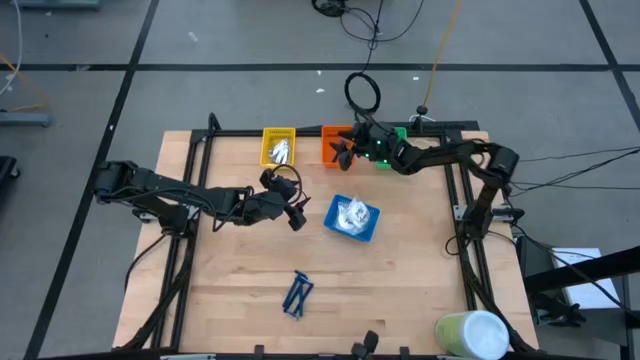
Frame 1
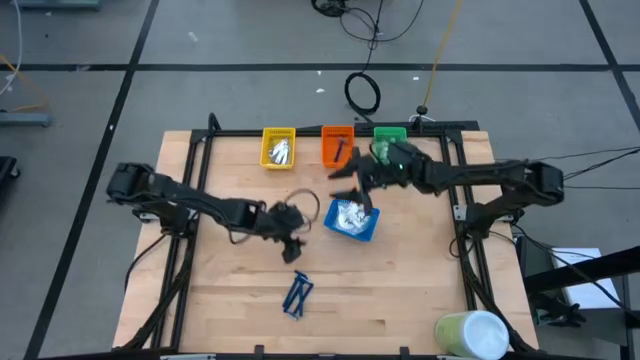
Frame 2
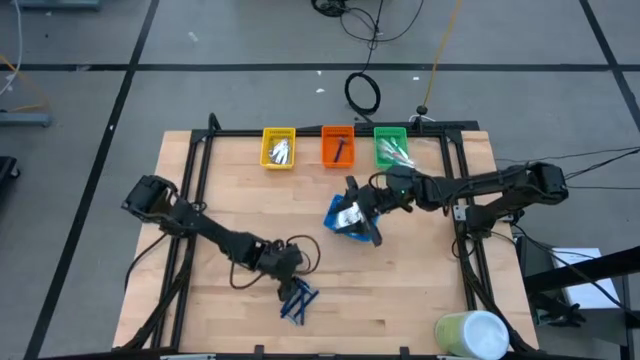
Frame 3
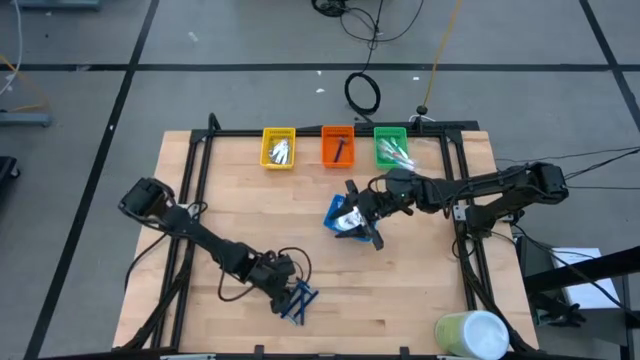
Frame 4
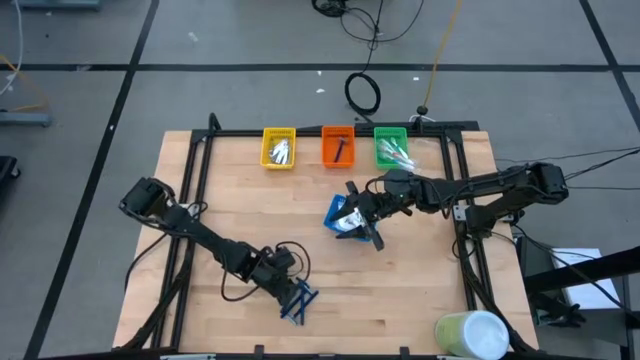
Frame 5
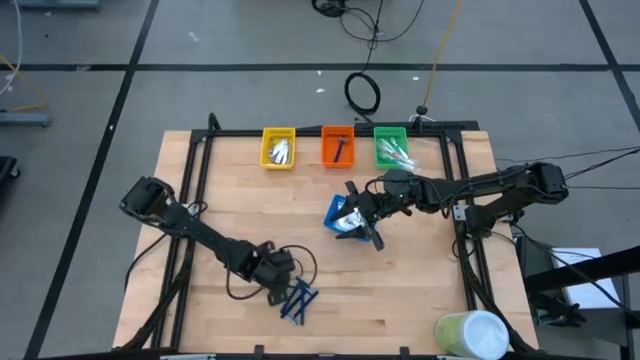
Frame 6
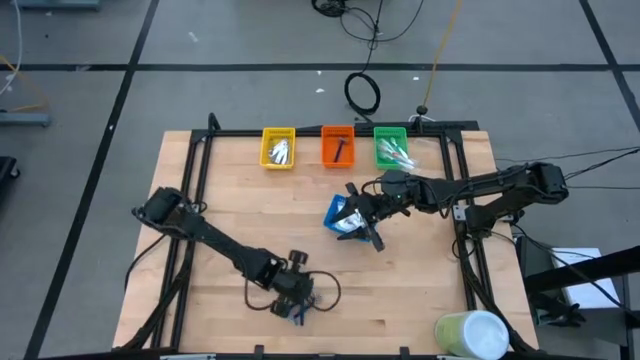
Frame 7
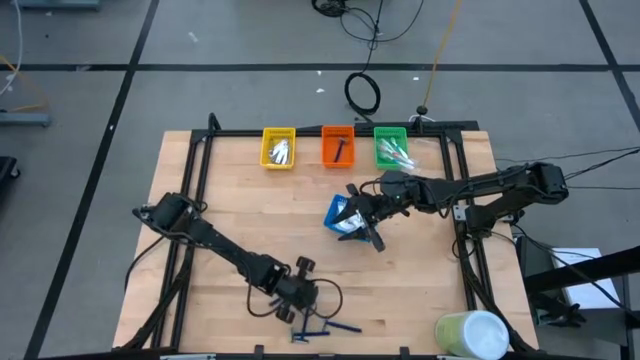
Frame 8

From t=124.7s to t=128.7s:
Task: Pick & Place Travel size toiletries
Put the blue razor into the orange basket

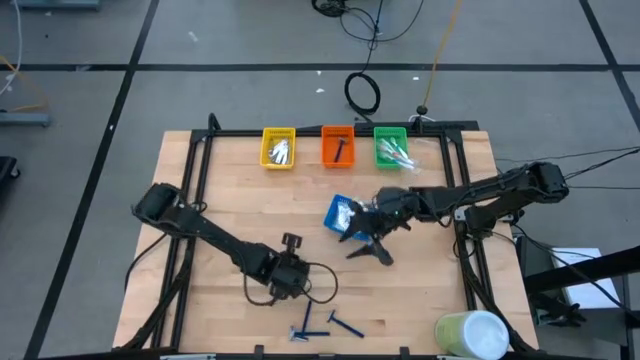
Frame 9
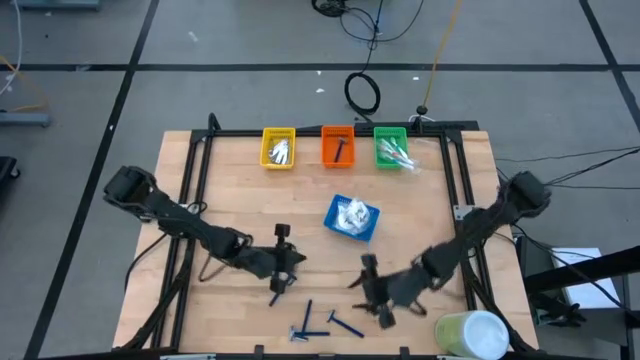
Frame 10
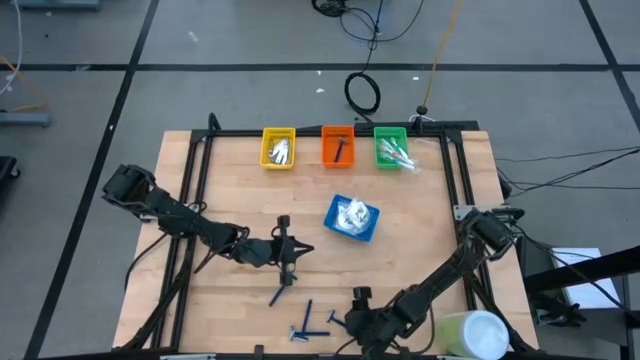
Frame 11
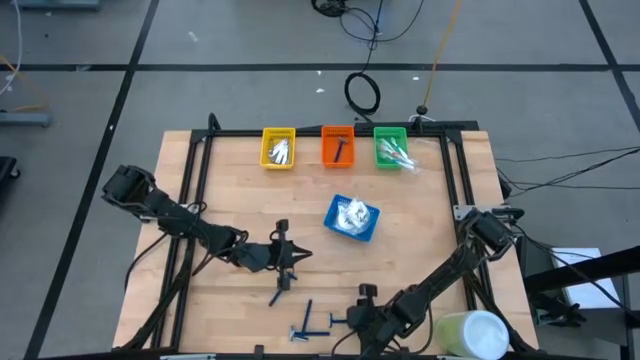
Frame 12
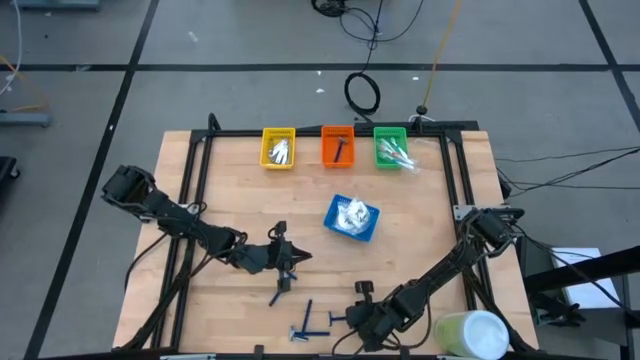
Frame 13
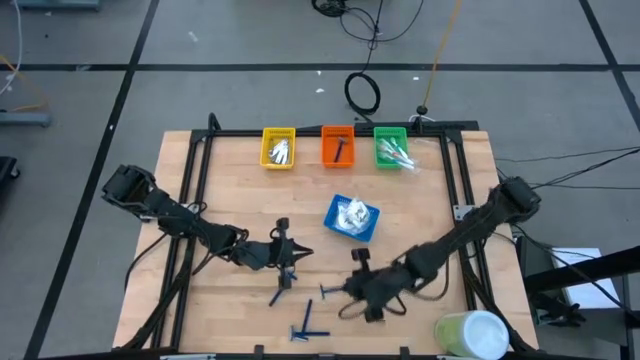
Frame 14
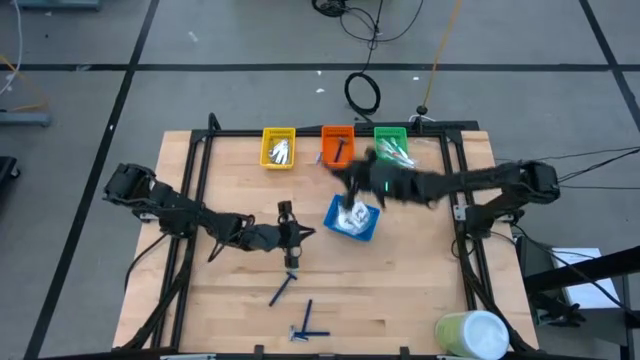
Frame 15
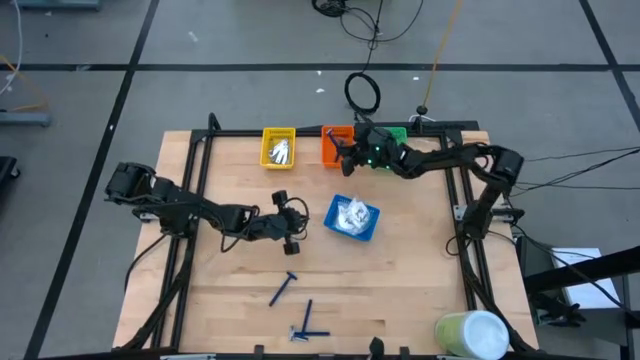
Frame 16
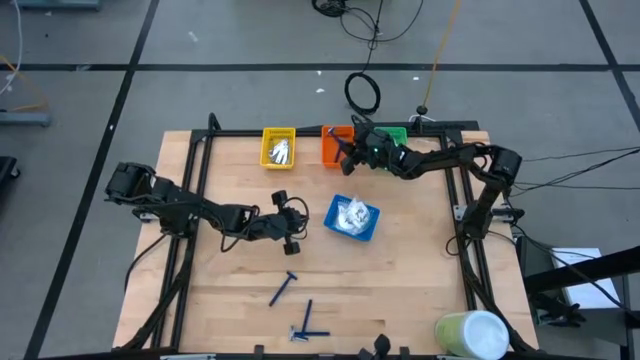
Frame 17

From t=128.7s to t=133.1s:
Put the blue razor into the orange basket

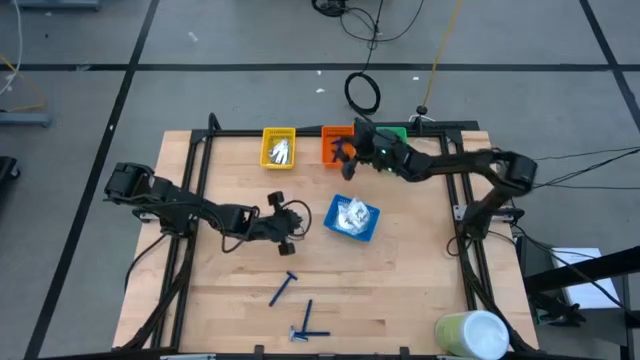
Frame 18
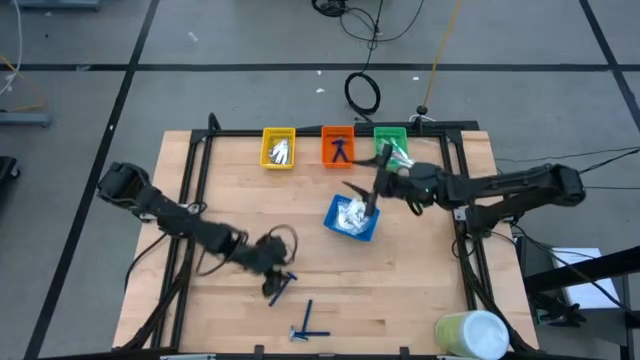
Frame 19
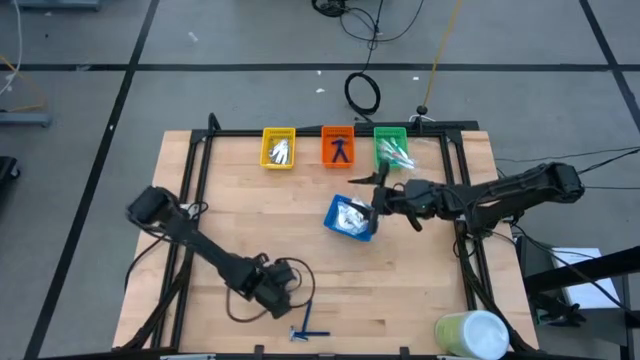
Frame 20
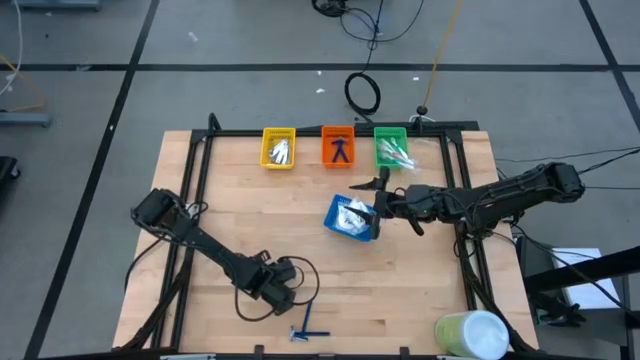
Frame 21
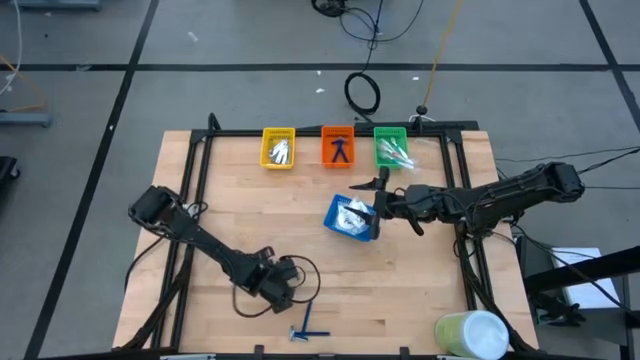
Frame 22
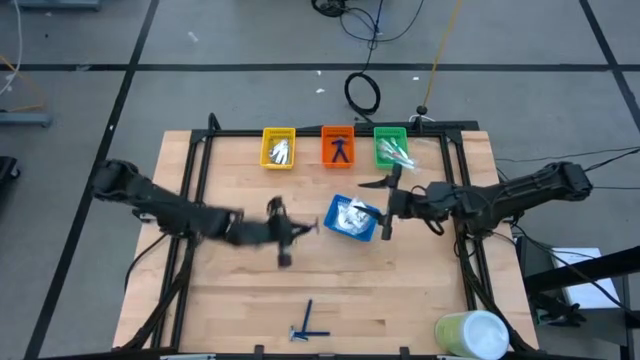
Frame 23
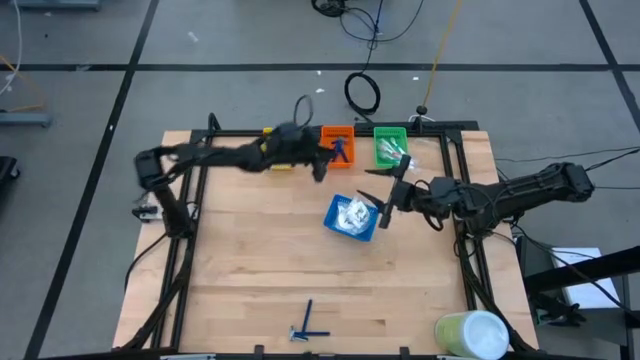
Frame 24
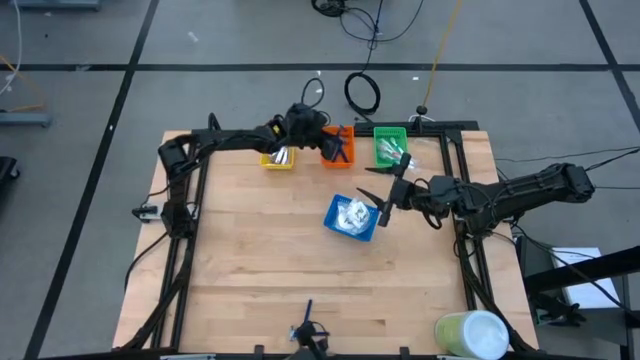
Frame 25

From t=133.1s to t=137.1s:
Put the blue razor into the orange basket

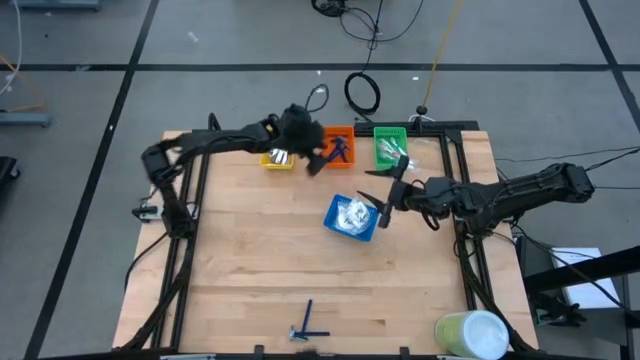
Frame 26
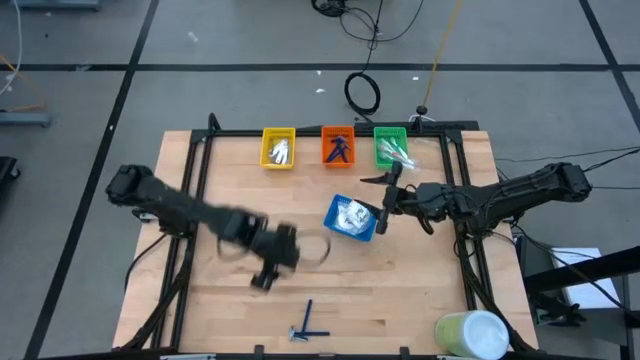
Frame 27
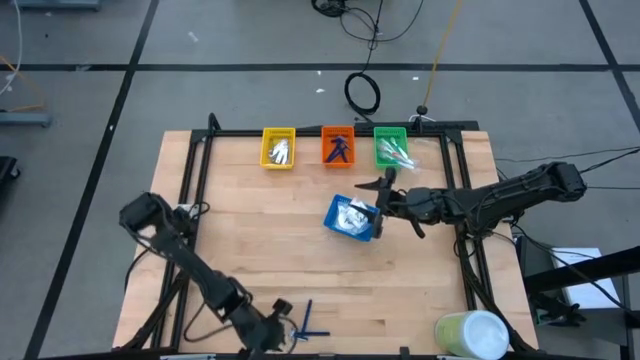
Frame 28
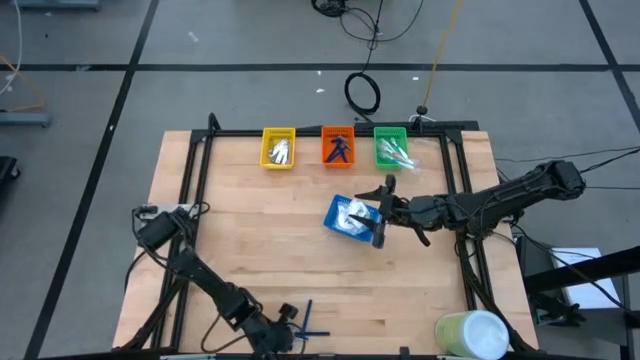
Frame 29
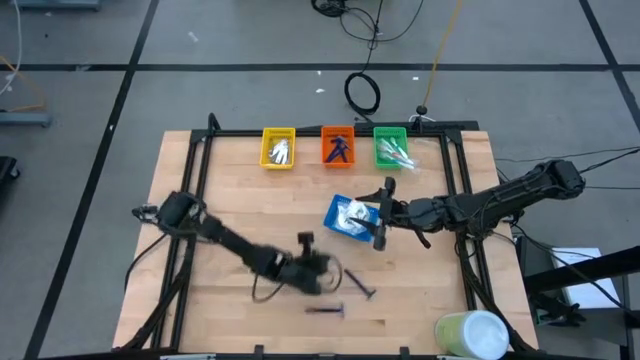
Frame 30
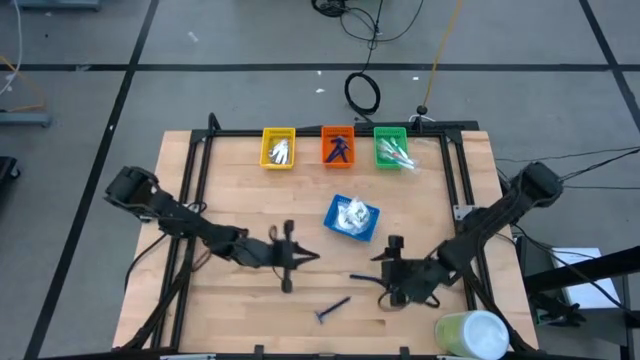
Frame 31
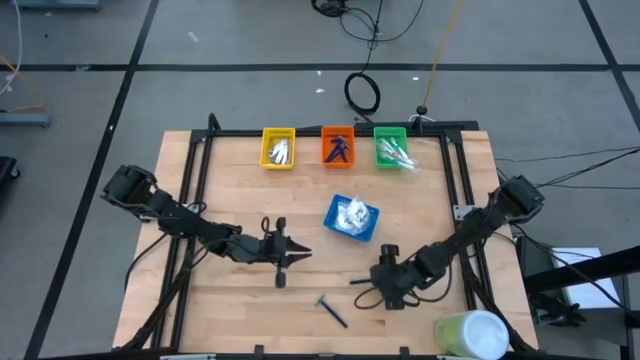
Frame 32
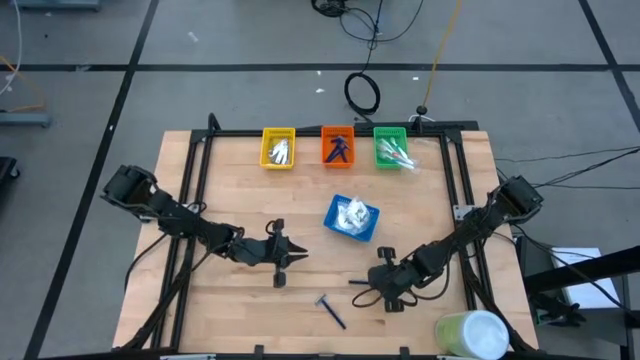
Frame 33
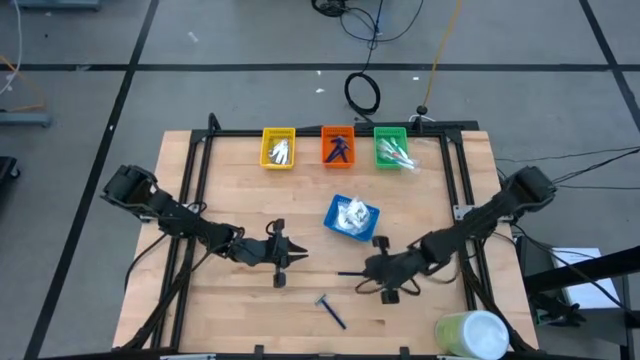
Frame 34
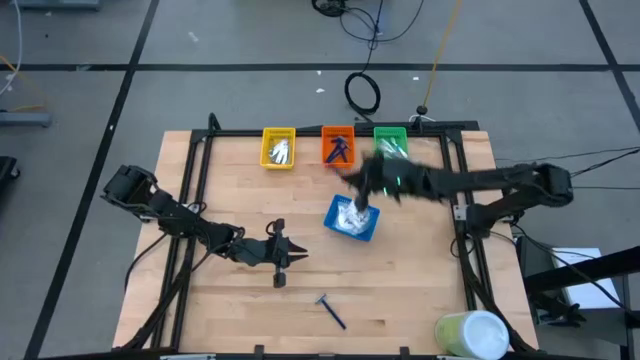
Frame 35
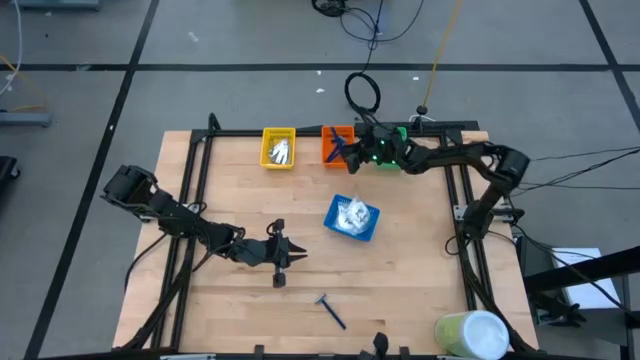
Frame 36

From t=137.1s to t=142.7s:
Put the blue razor into the orange basket
